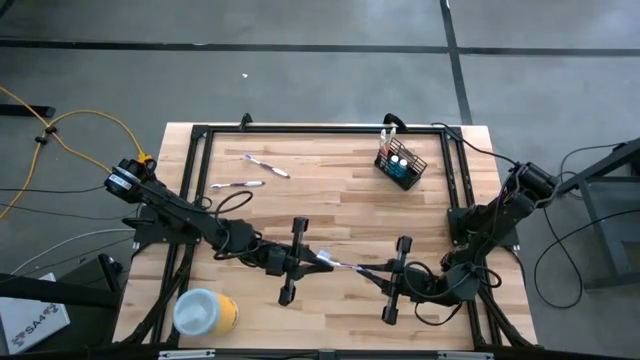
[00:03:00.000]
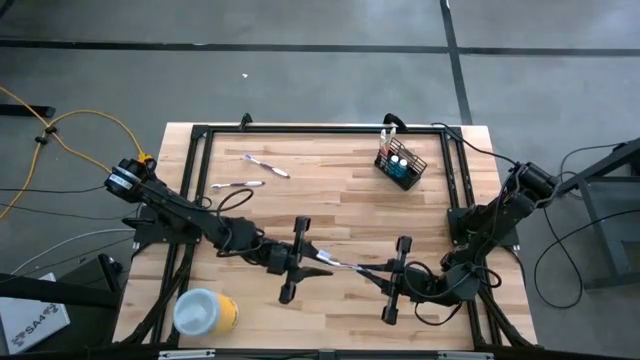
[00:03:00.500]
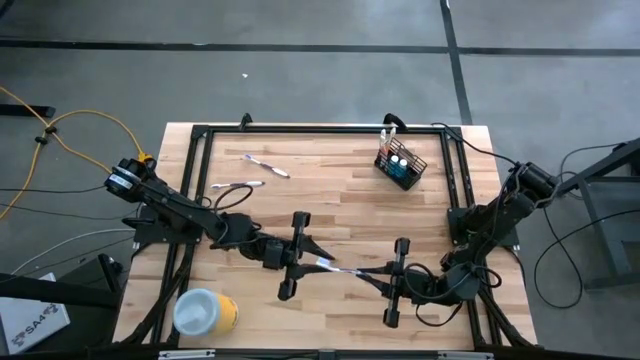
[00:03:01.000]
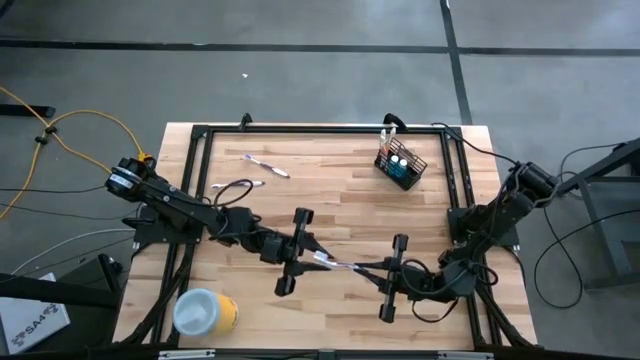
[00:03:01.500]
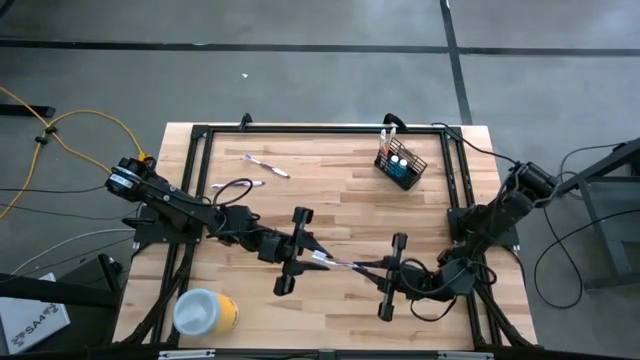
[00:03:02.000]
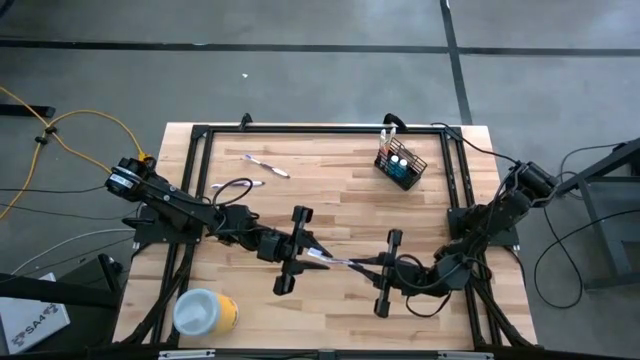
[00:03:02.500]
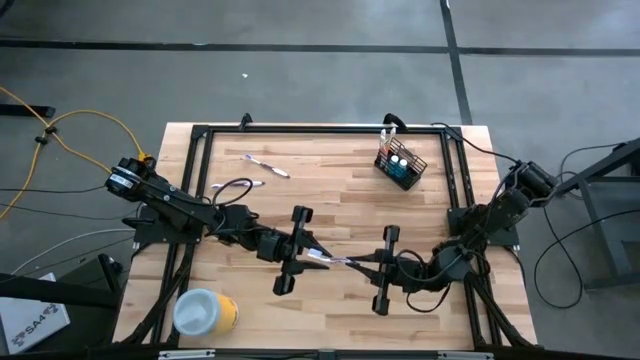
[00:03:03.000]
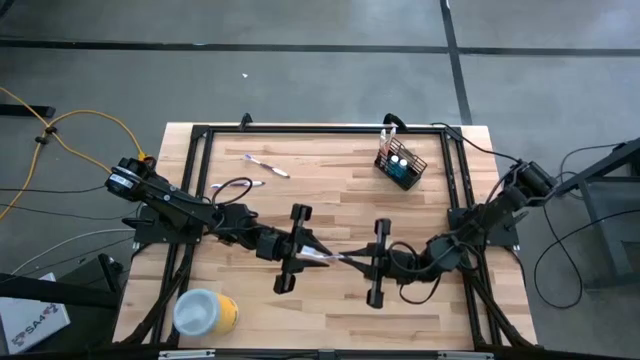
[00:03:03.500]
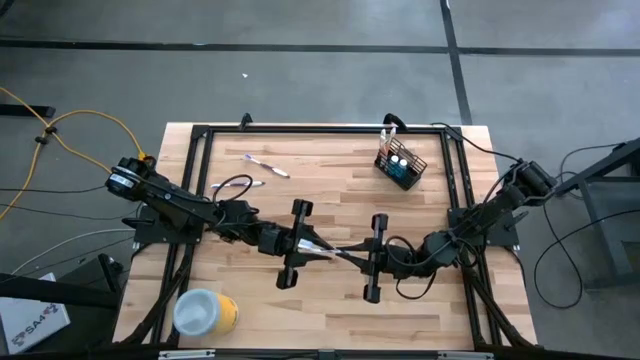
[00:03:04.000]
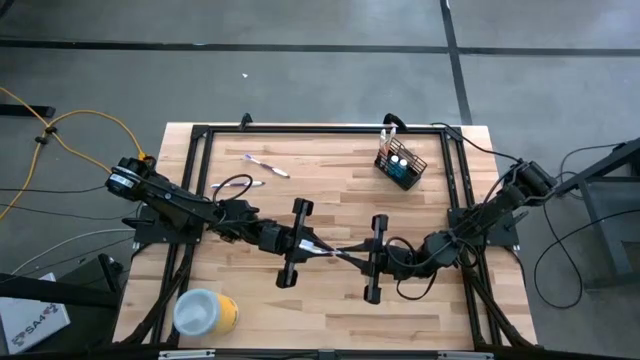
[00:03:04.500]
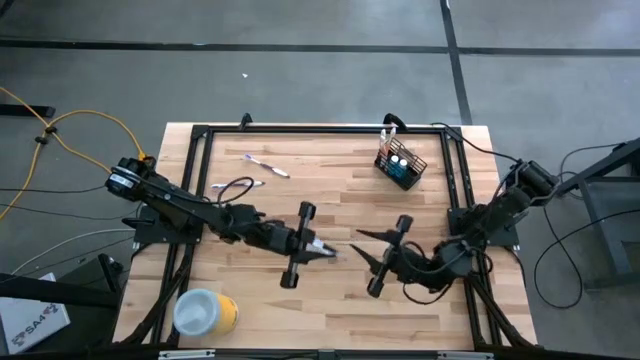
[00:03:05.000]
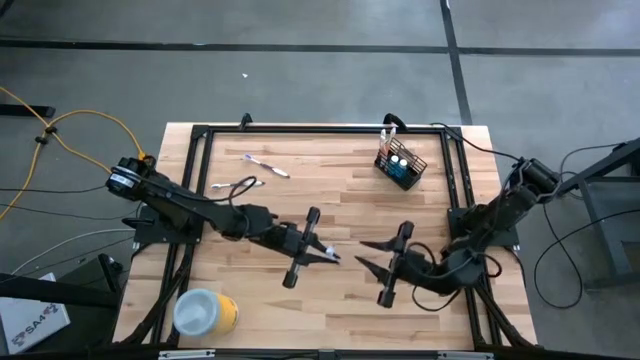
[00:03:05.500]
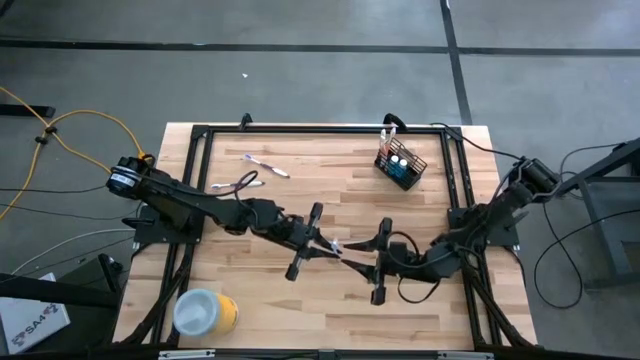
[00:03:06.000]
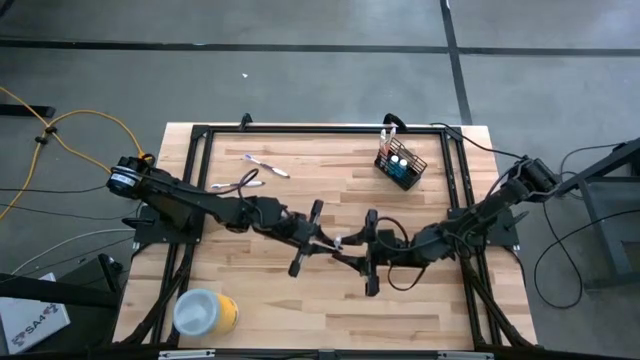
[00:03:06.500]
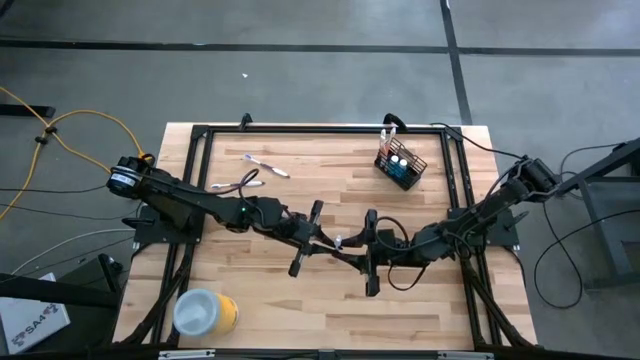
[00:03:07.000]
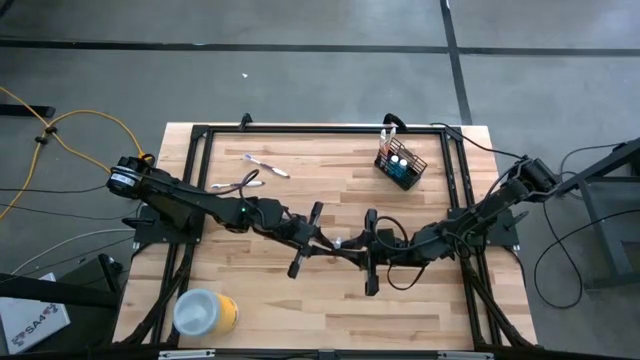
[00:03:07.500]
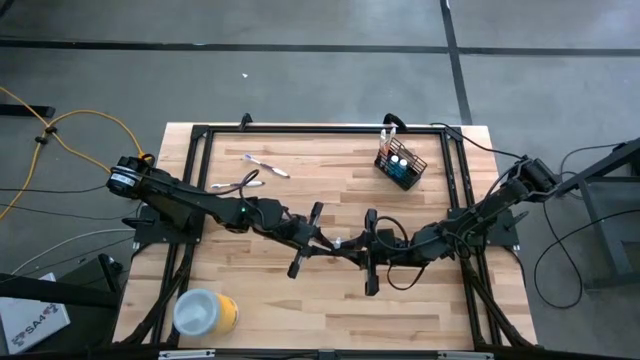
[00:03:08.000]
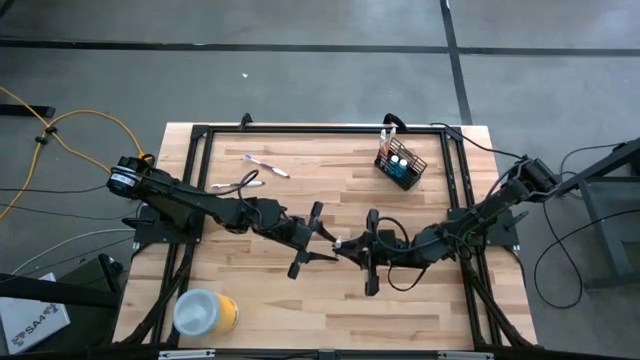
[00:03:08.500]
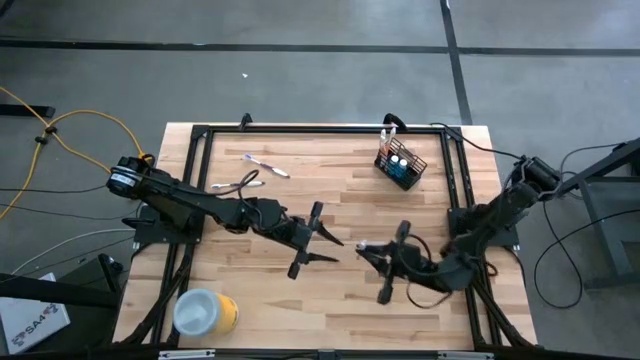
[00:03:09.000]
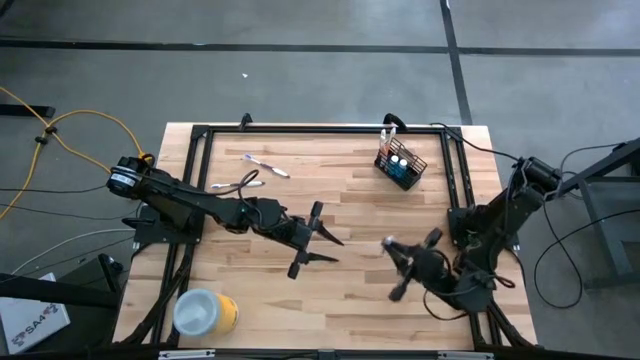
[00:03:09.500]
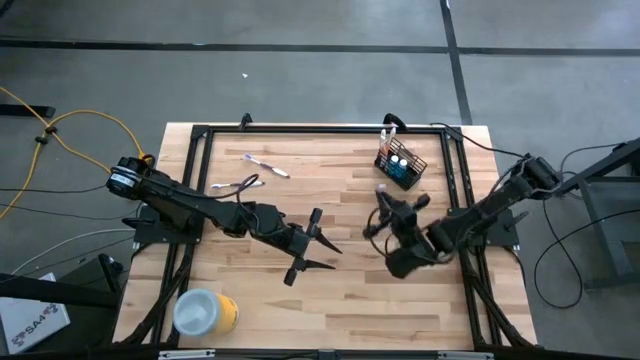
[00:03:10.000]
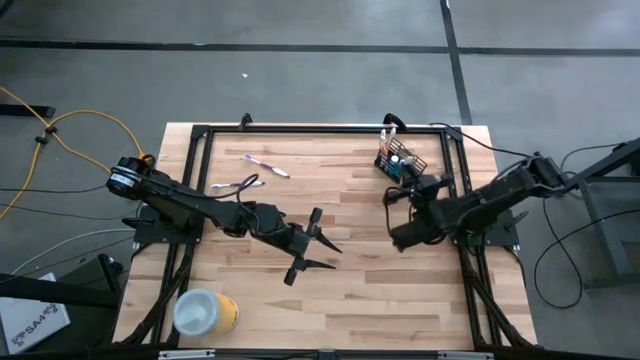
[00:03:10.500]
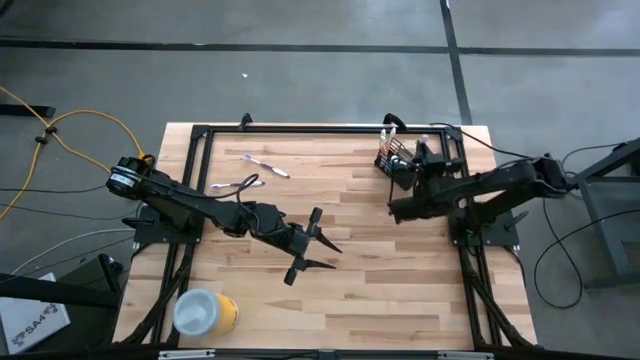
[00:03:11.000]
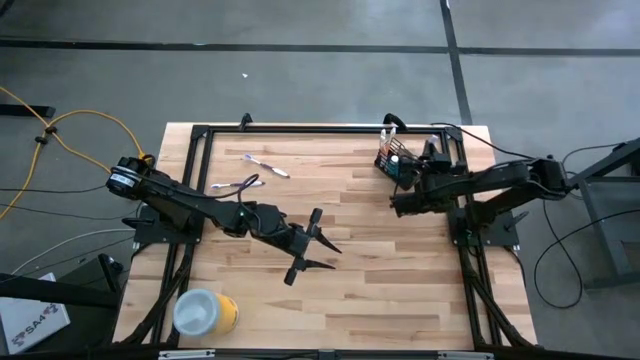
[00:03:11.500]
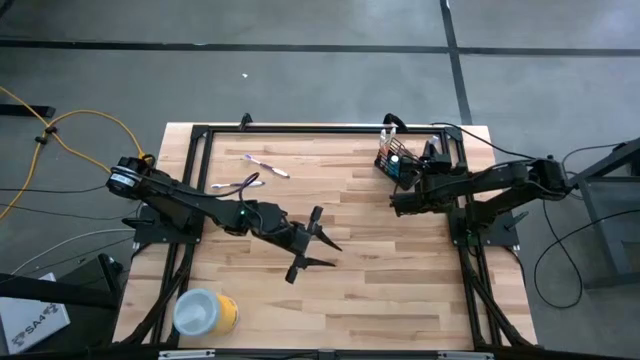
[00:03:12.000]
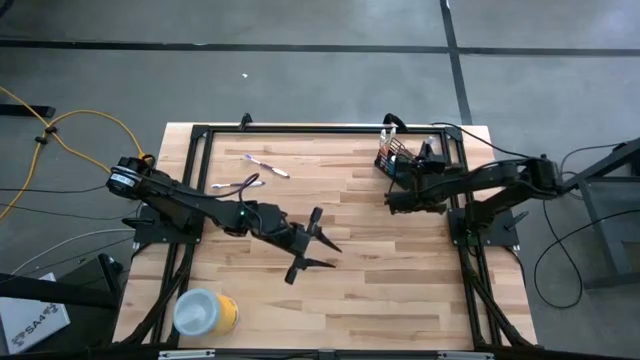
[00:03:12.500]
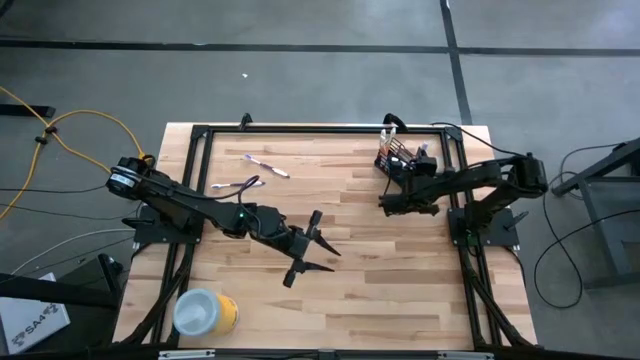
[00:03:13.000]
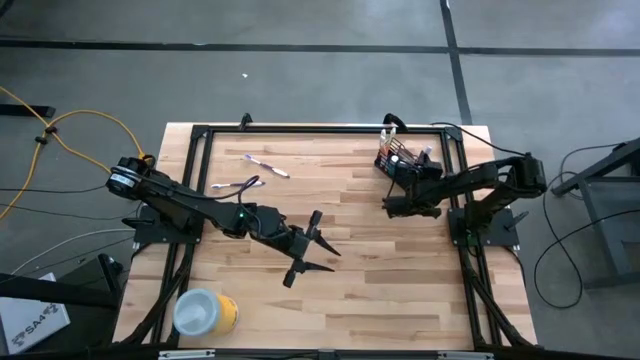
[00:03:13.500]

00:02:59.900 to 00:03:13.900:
Task: Pick & Place toothbrushing station
Put the bottom right purple toothbrush into the right of the black mesh organizer
